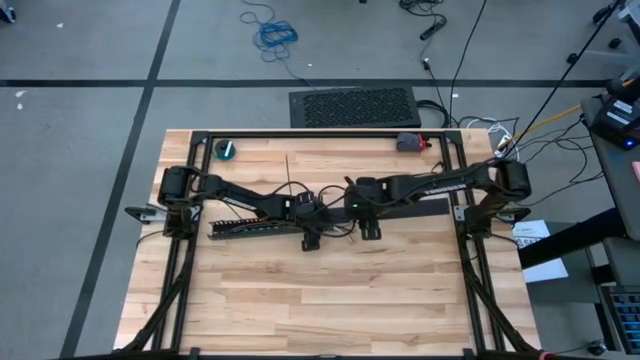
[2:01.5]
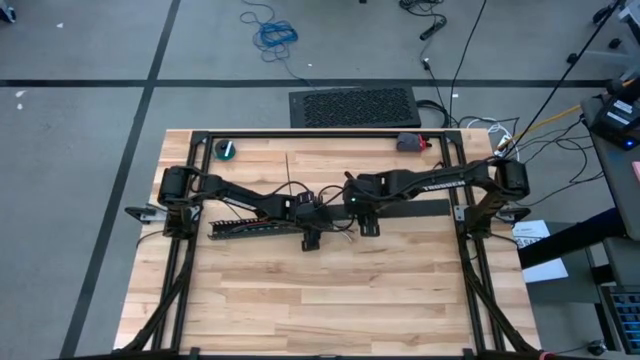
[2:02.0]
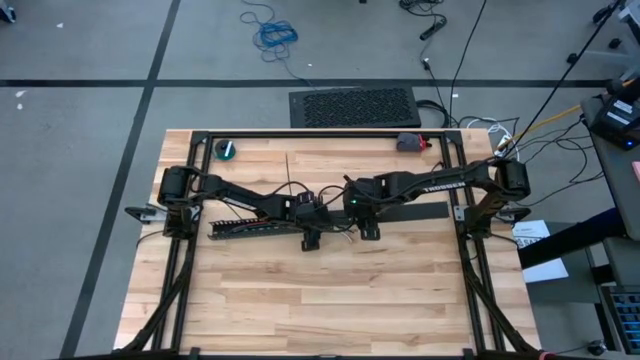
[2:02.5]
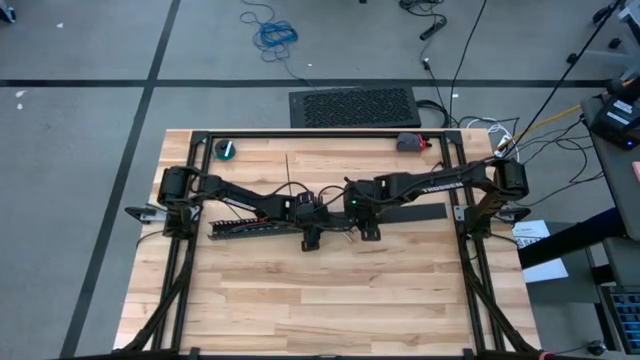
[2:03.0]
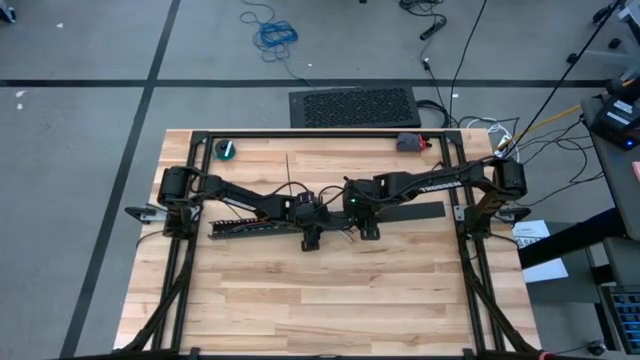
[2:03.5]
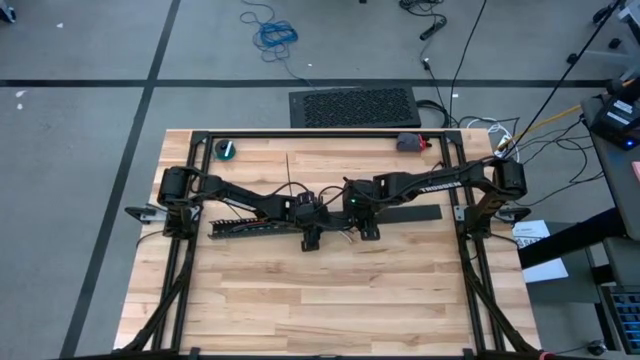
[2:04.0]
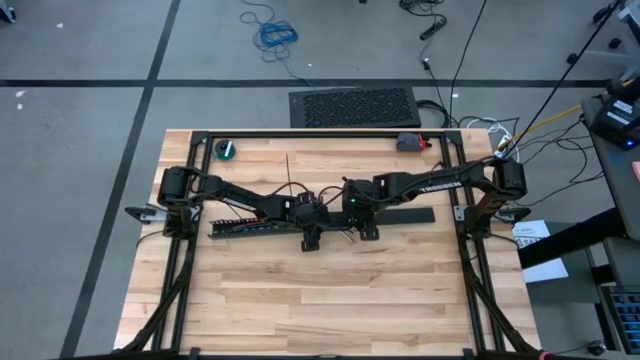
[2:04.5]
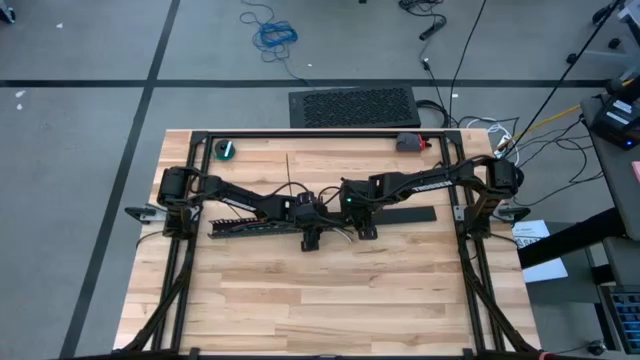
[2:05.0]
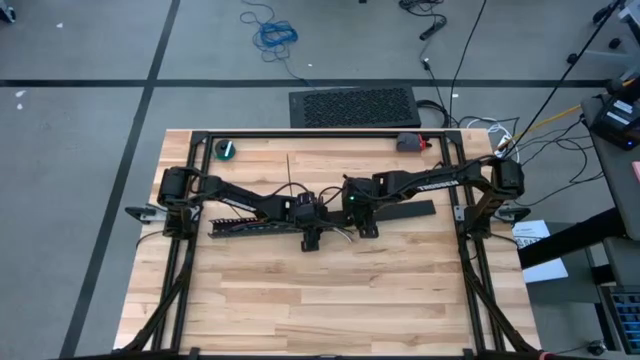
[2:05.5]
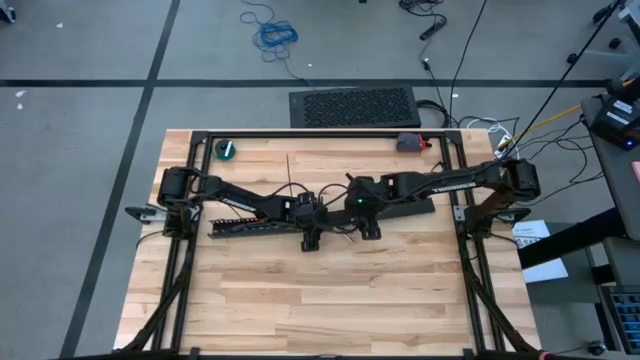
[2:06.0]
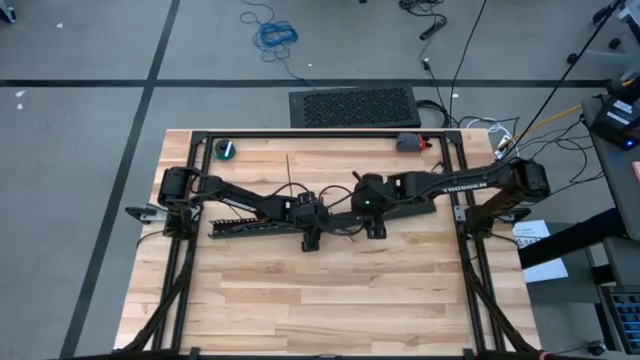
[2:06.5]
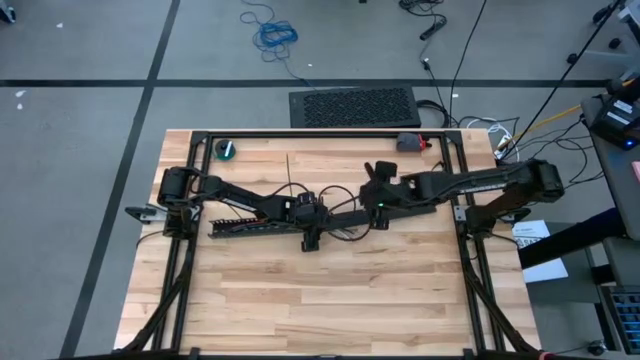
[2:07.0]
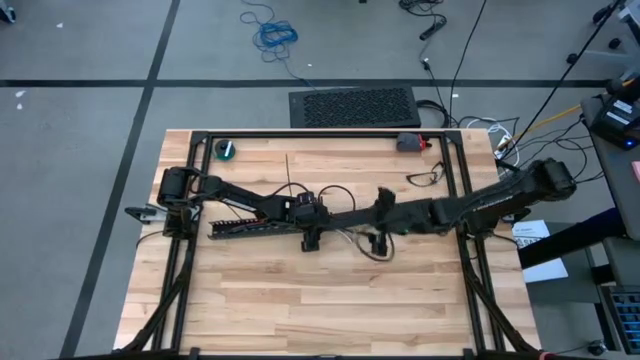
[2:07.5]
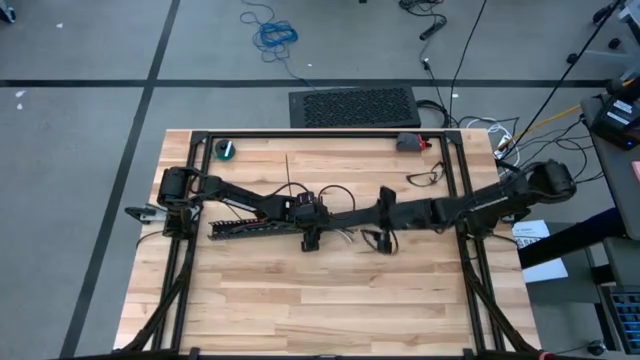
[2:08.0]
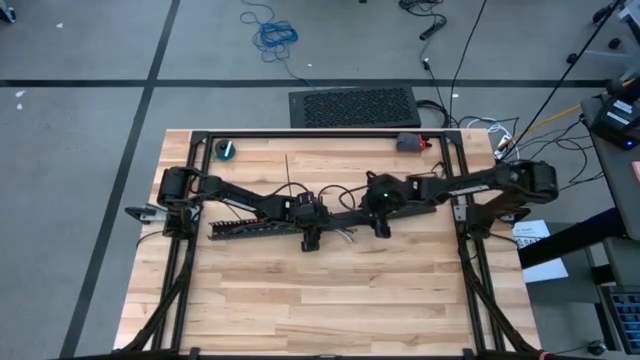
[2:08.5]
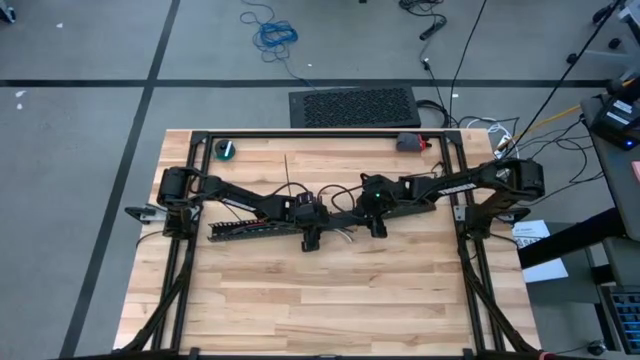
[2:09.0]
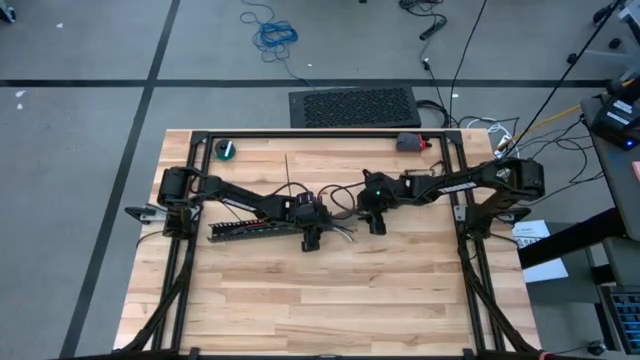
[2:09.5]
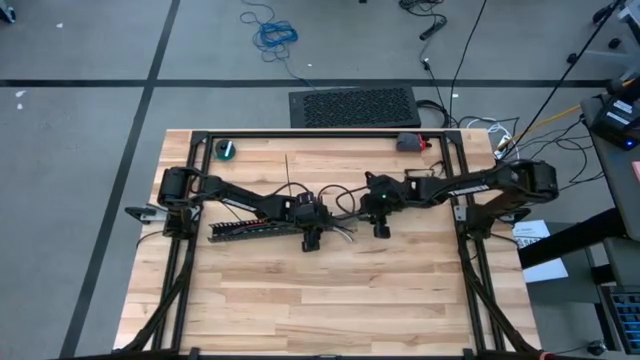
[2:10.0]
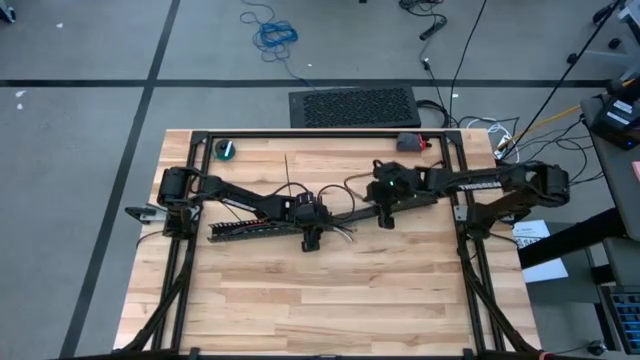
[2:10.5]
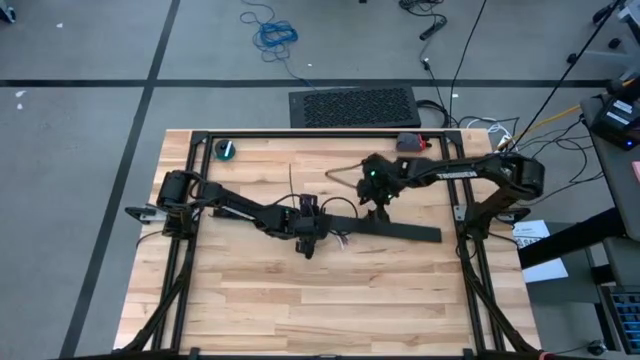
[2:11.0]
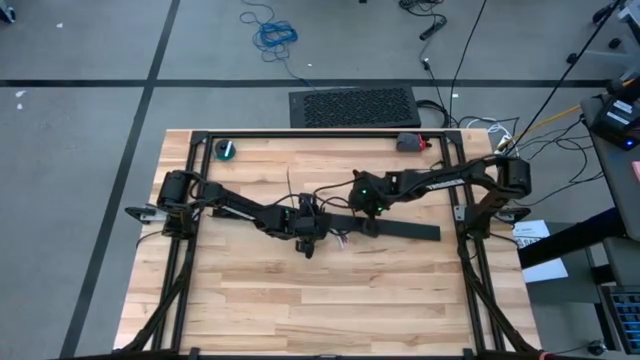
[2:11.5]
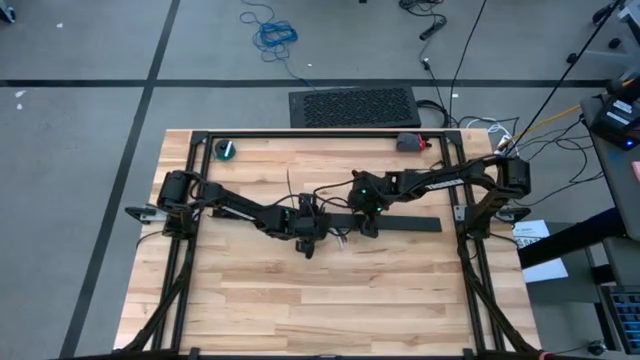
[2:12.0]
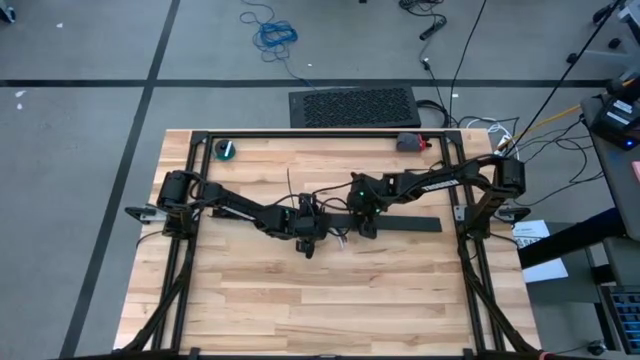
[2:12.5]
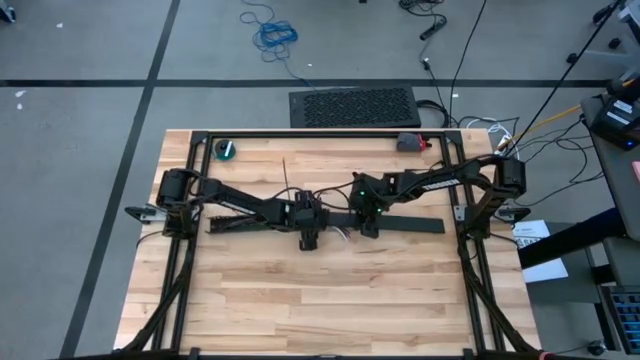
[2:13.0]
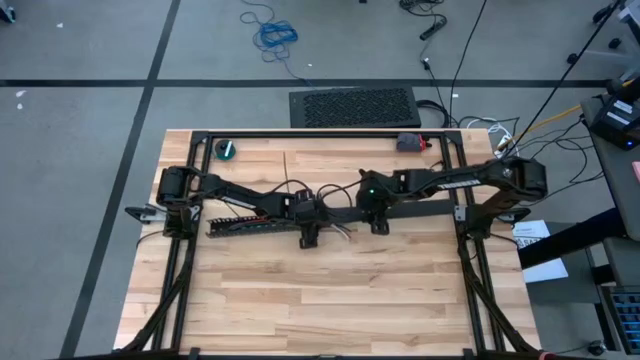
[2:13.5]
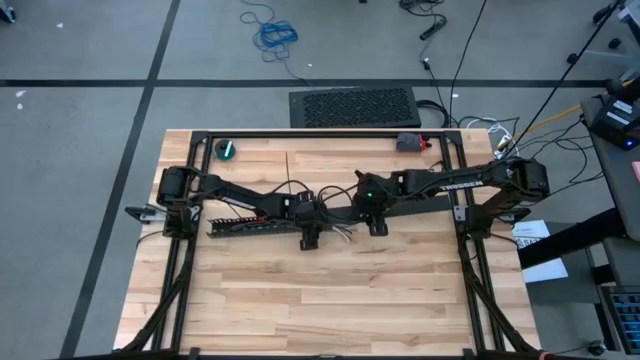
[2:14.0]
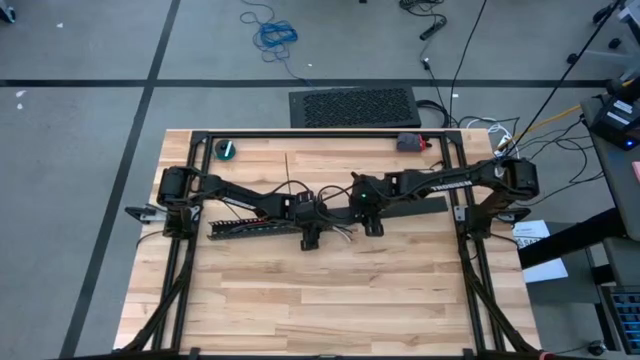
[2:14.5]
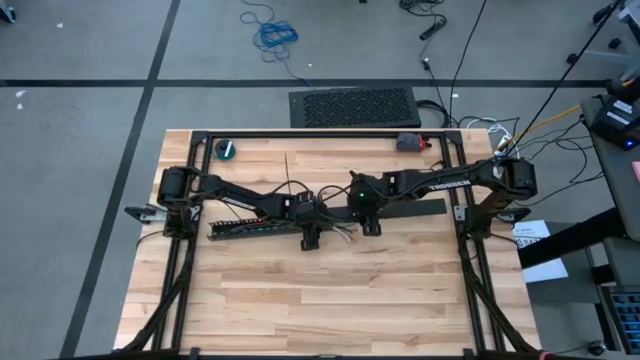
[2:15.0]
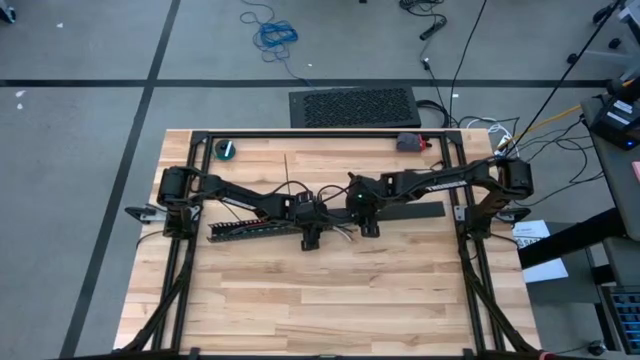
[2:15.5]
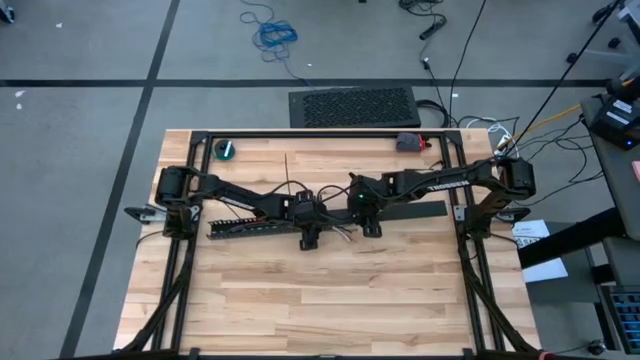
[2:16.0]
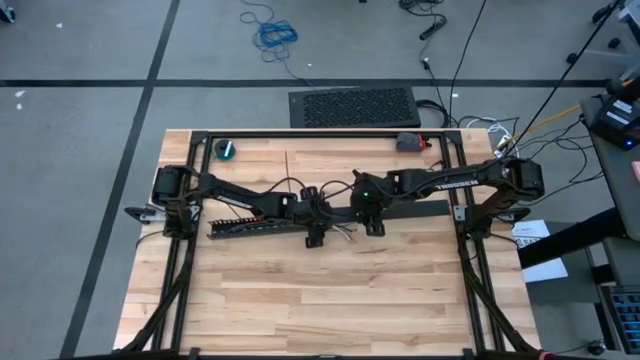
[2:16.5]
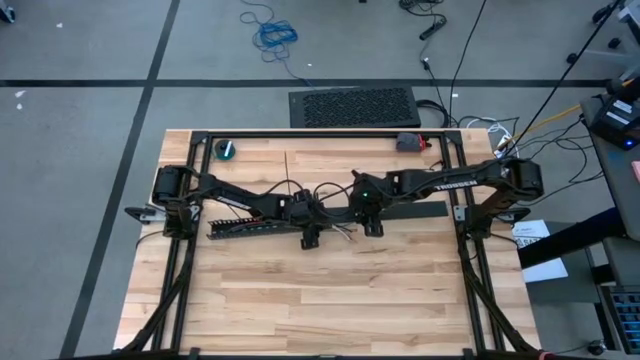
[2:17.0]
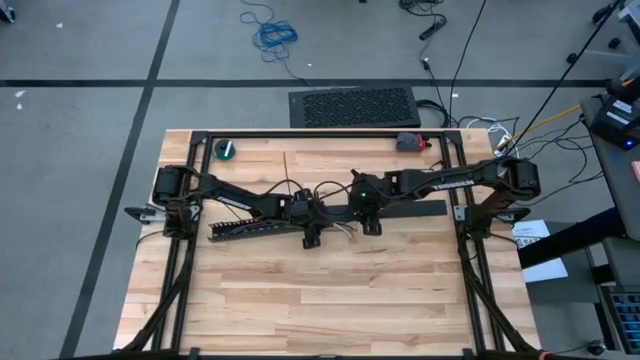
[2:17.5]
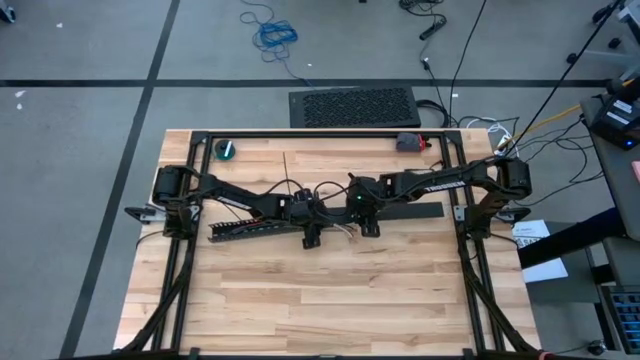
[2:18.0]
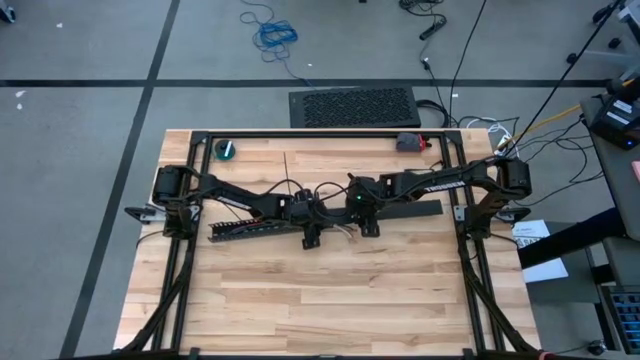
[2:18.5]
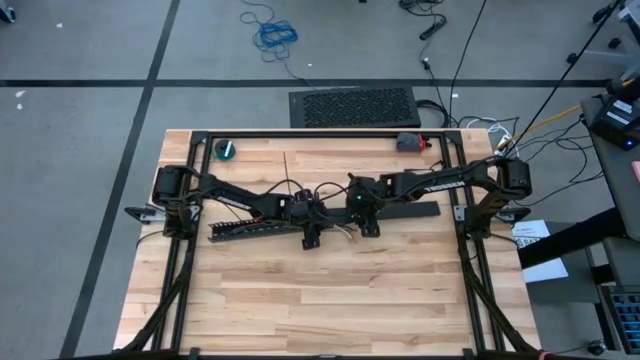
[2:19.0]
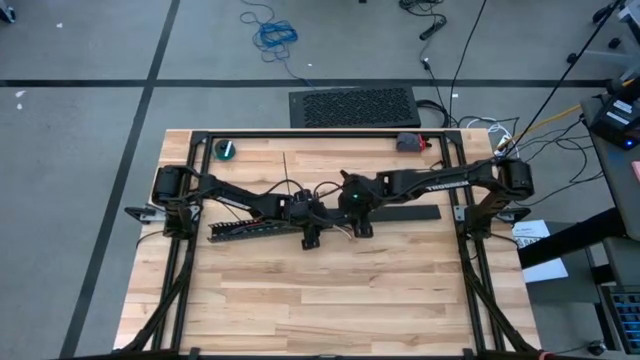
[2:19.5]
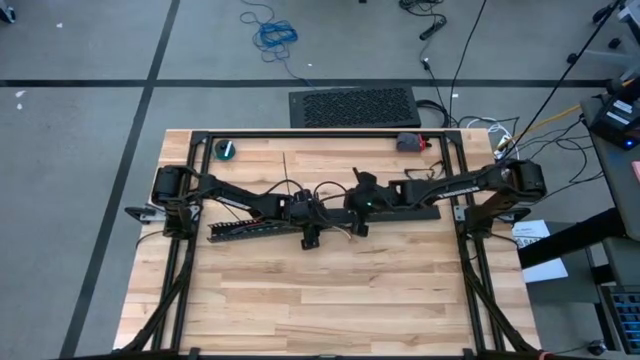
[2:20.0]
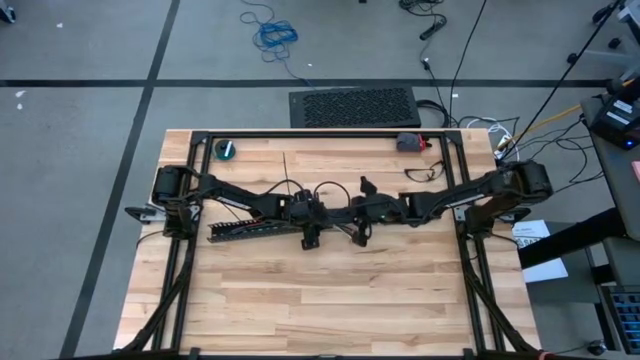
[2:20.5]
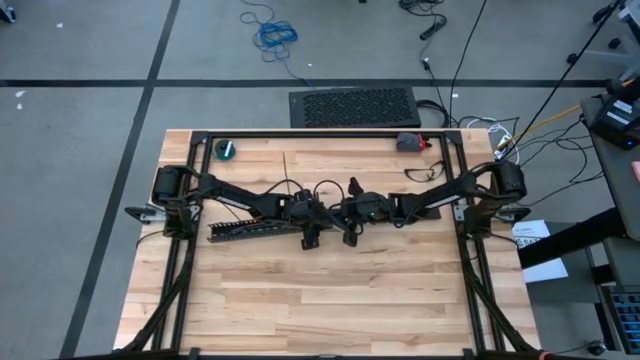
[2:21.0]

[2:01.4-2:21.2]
Task: Ziptie cables
Insert the cable duct cover
